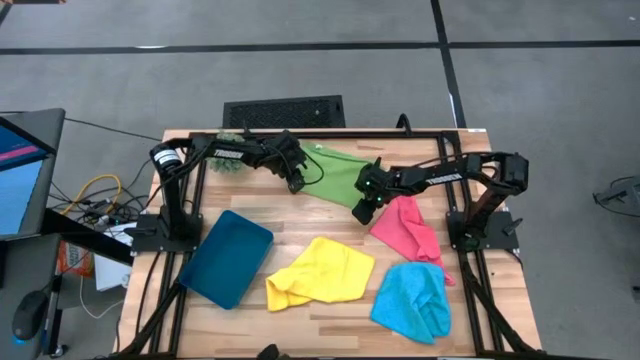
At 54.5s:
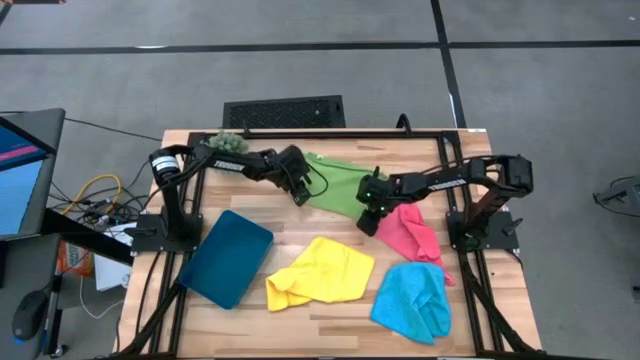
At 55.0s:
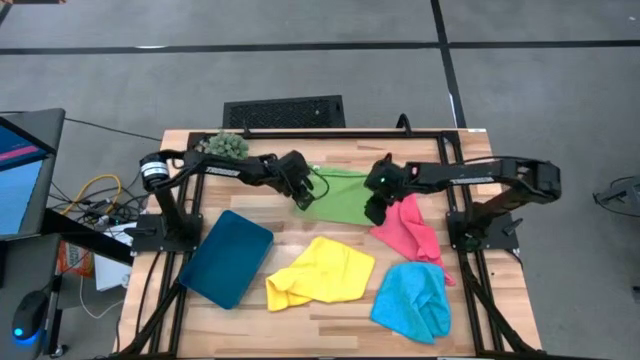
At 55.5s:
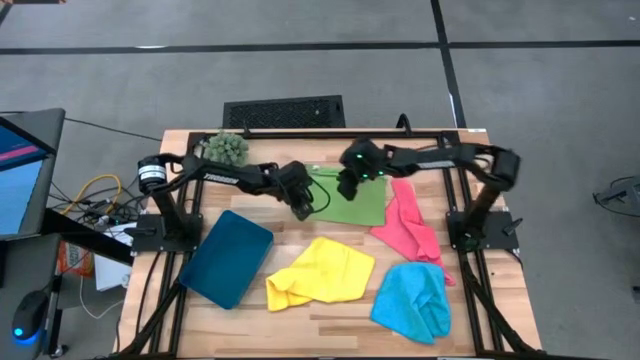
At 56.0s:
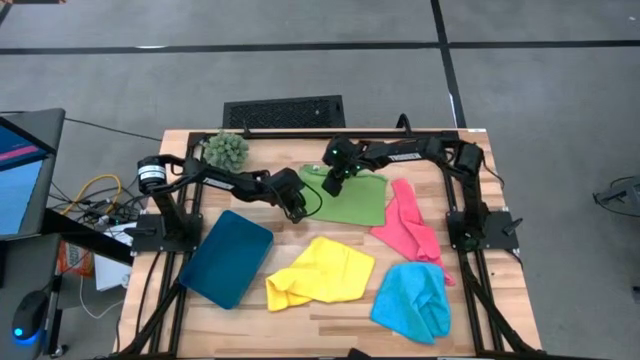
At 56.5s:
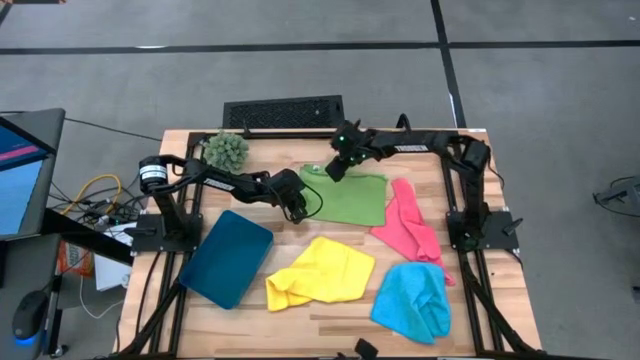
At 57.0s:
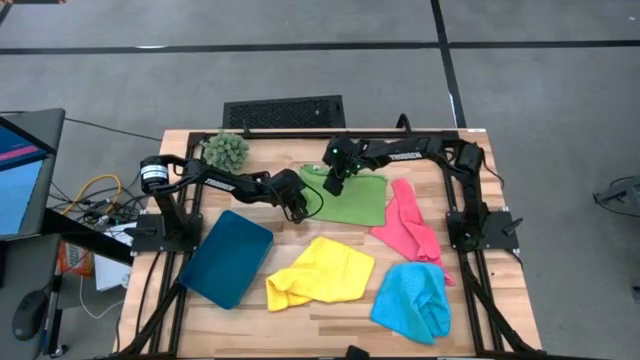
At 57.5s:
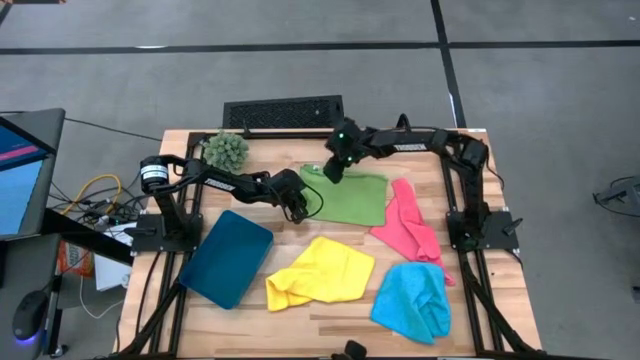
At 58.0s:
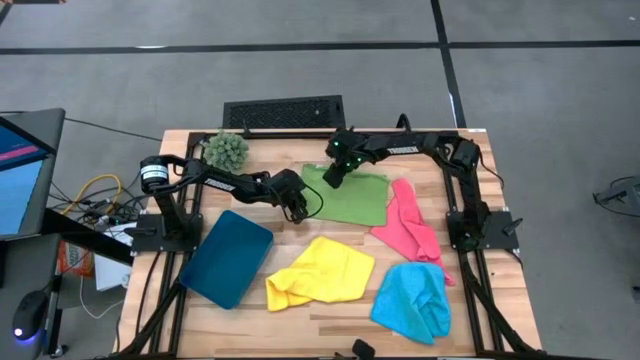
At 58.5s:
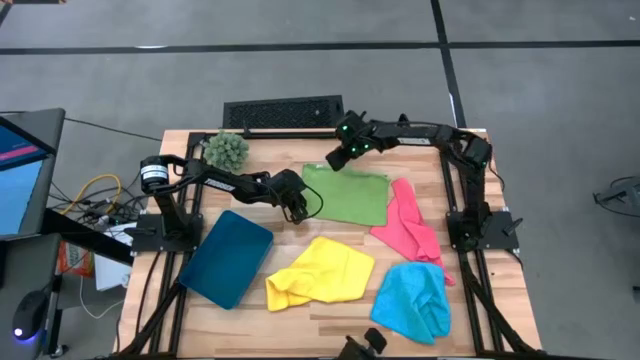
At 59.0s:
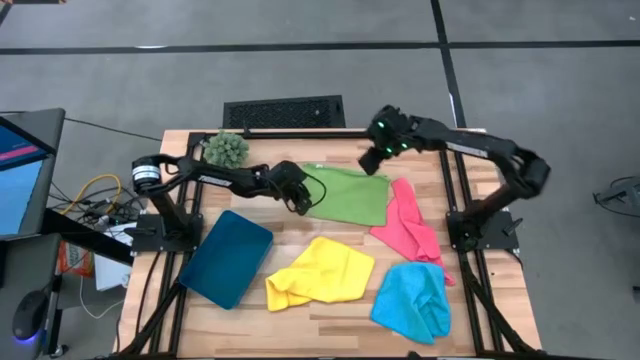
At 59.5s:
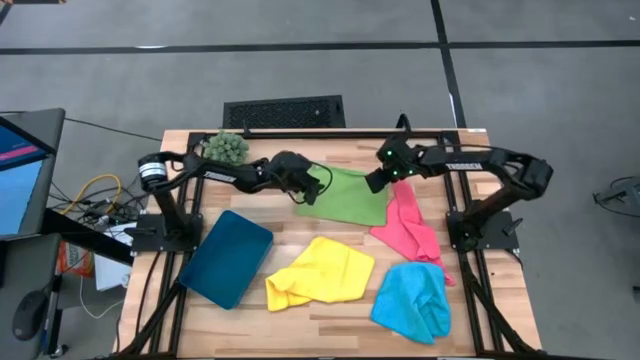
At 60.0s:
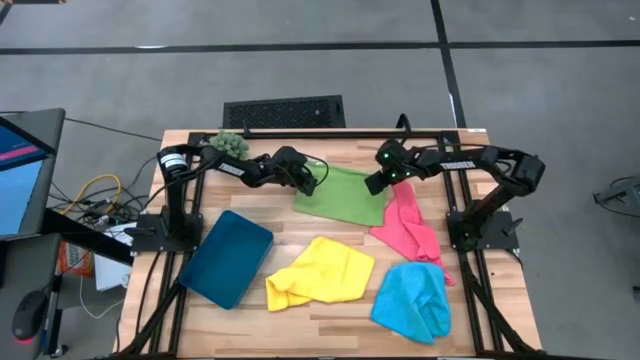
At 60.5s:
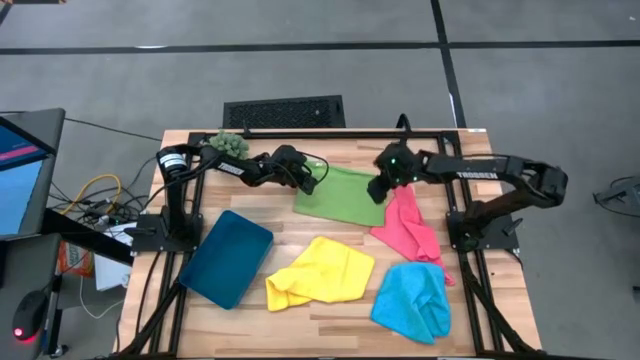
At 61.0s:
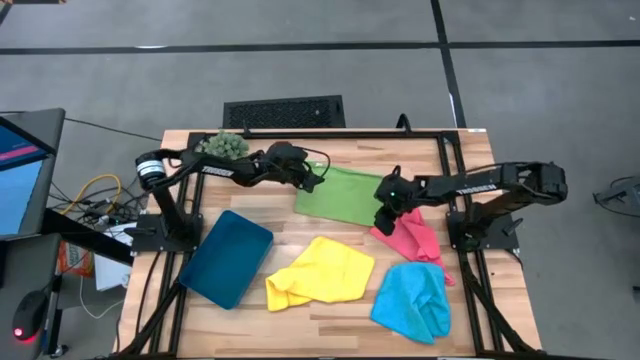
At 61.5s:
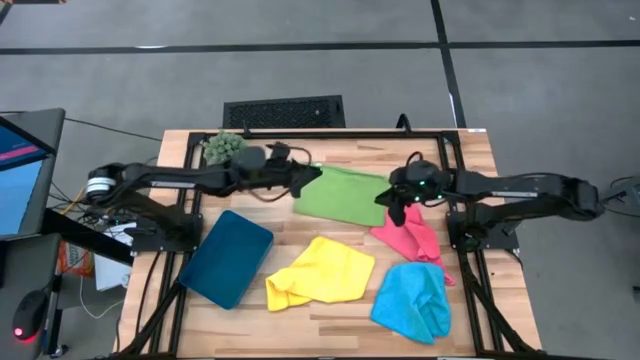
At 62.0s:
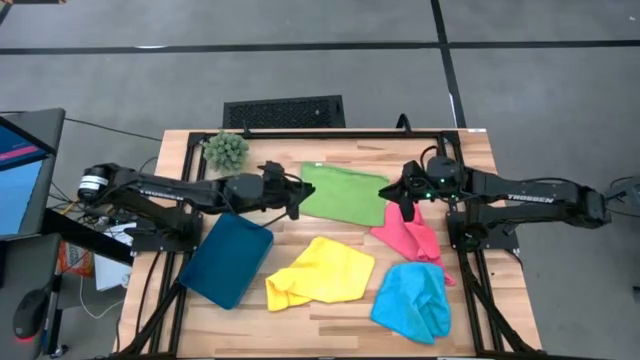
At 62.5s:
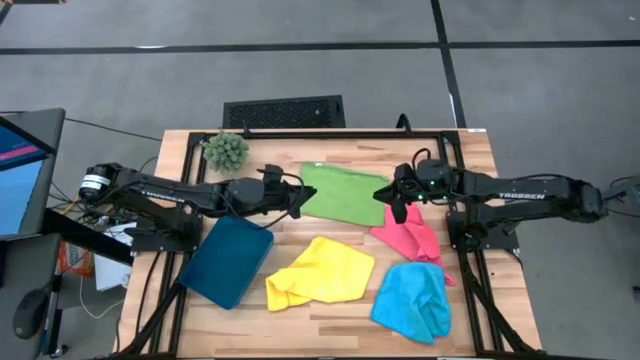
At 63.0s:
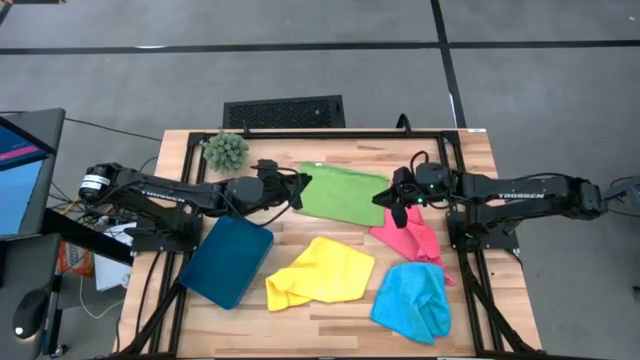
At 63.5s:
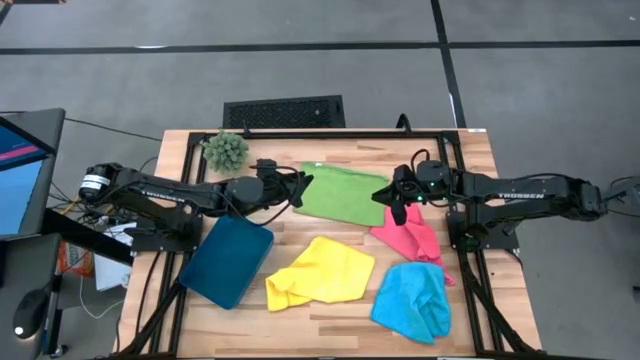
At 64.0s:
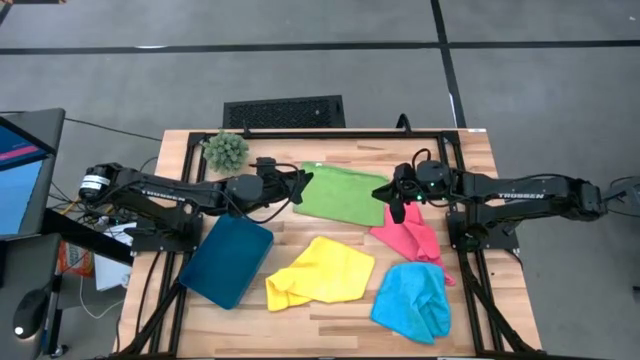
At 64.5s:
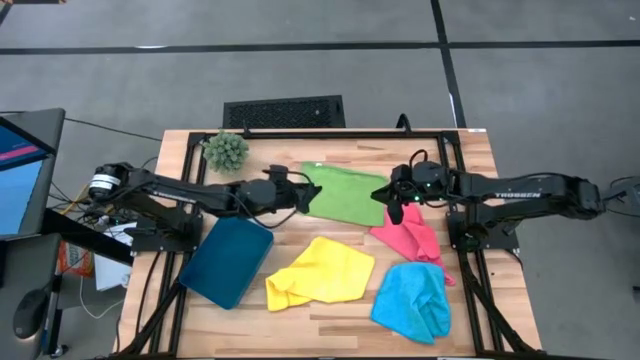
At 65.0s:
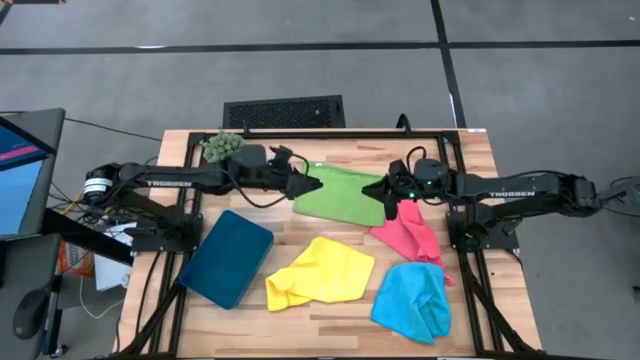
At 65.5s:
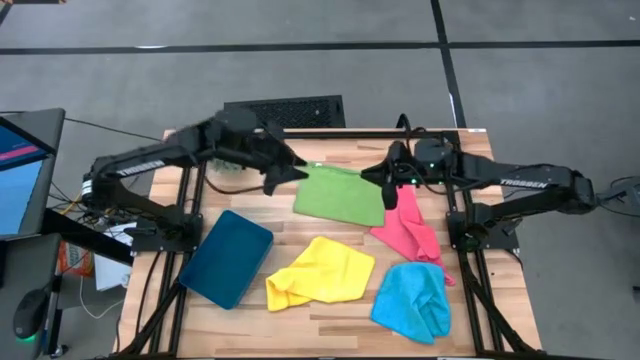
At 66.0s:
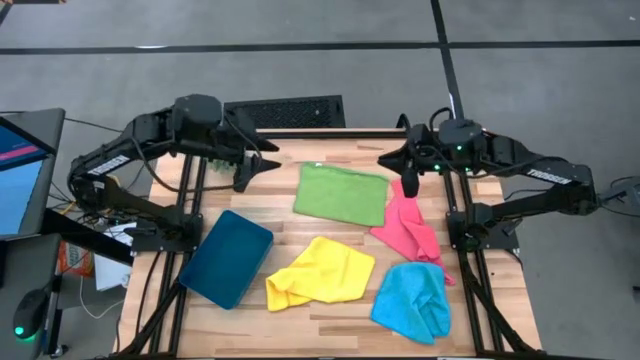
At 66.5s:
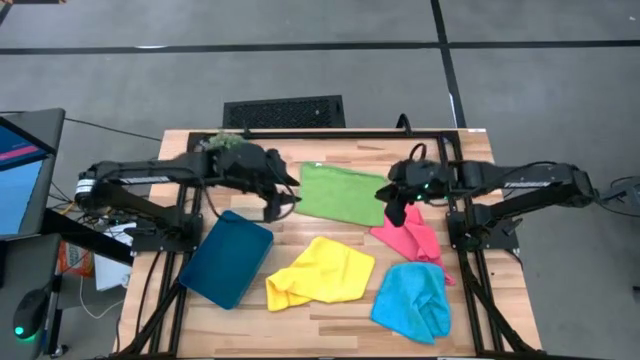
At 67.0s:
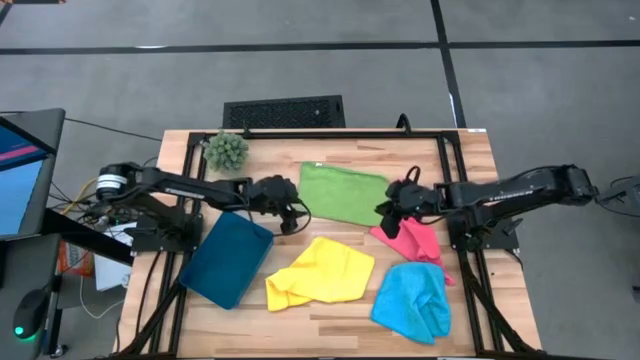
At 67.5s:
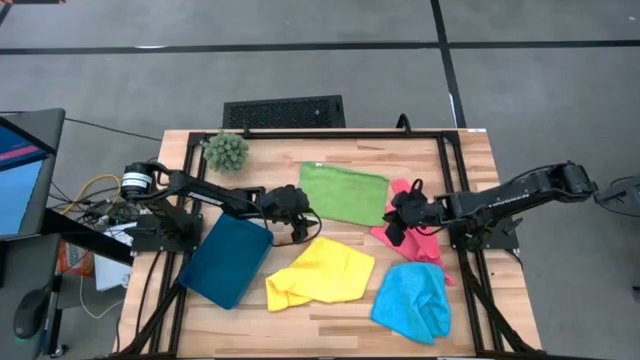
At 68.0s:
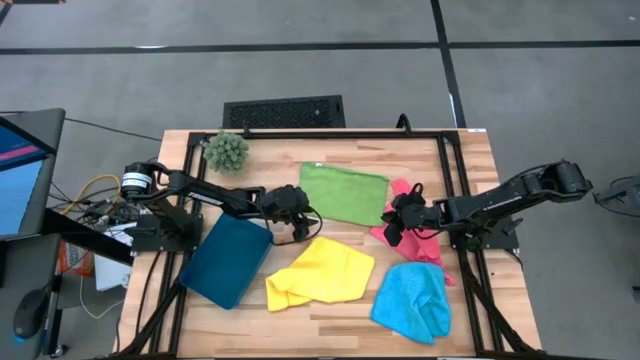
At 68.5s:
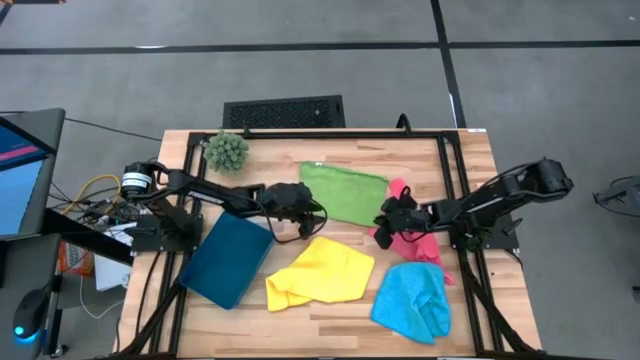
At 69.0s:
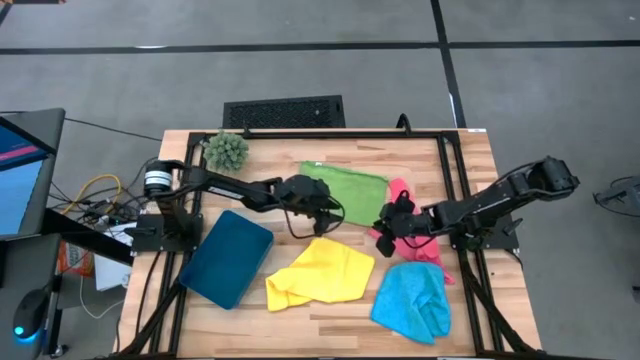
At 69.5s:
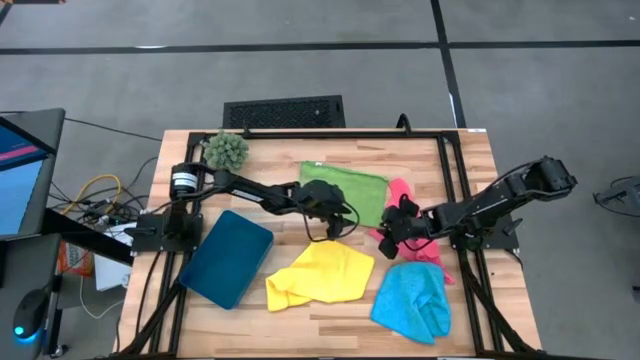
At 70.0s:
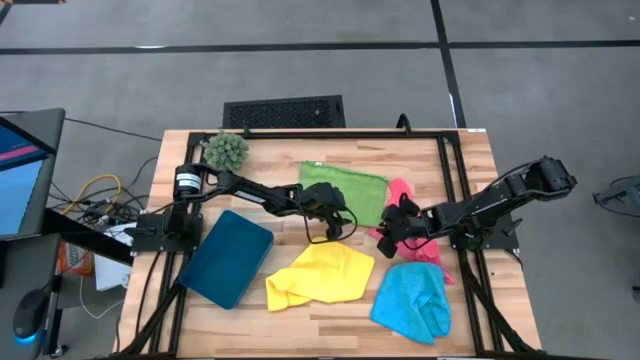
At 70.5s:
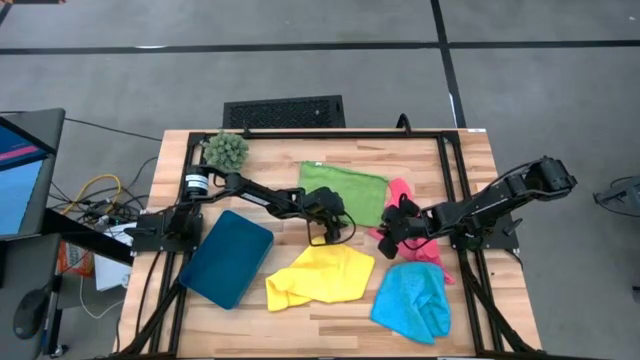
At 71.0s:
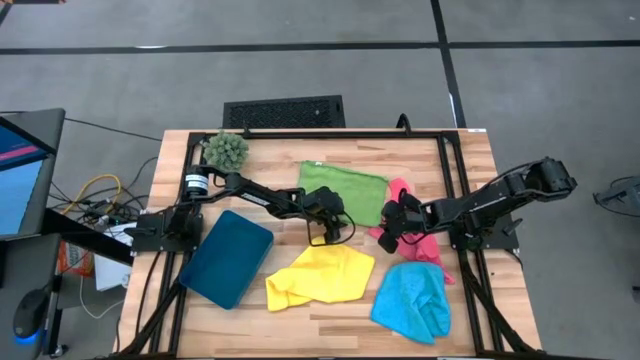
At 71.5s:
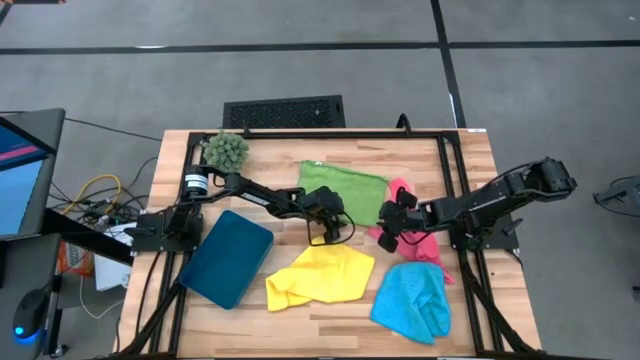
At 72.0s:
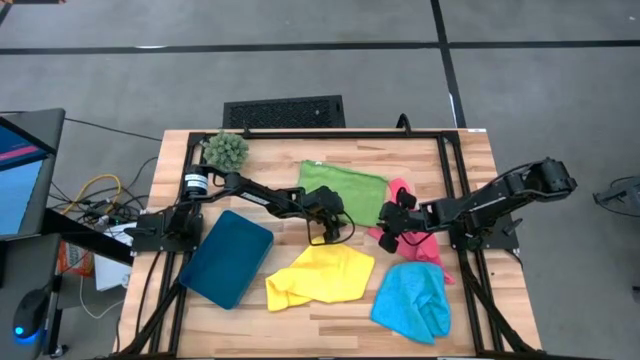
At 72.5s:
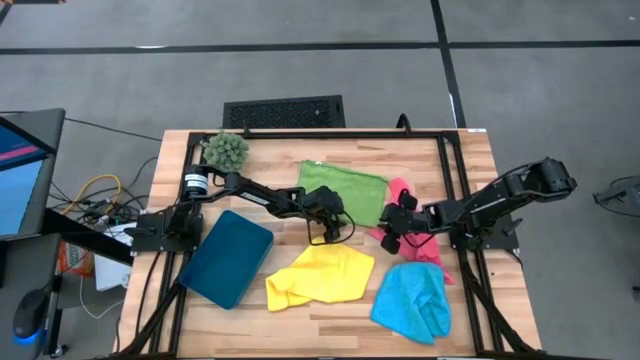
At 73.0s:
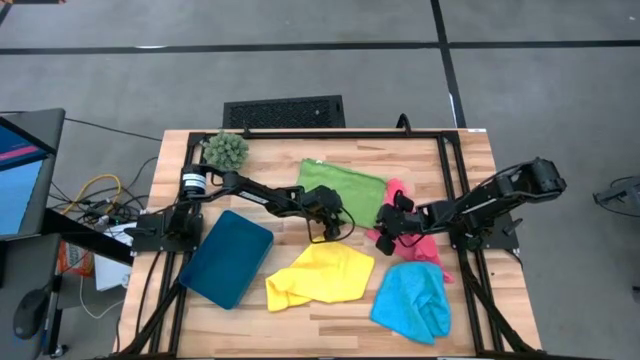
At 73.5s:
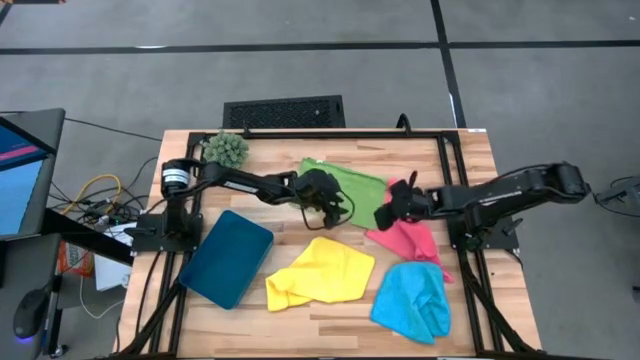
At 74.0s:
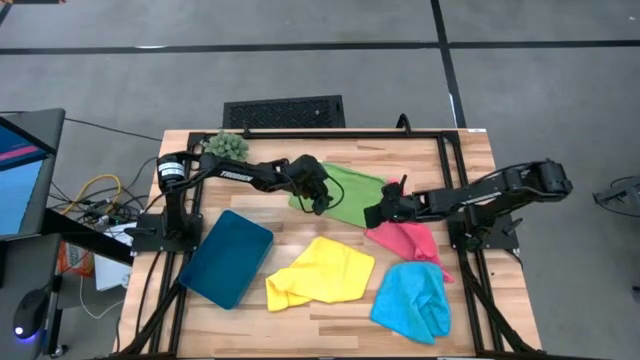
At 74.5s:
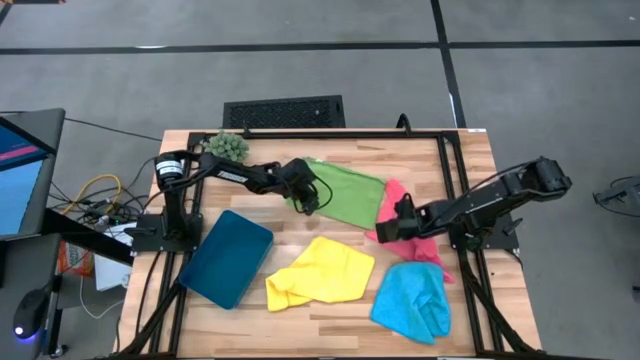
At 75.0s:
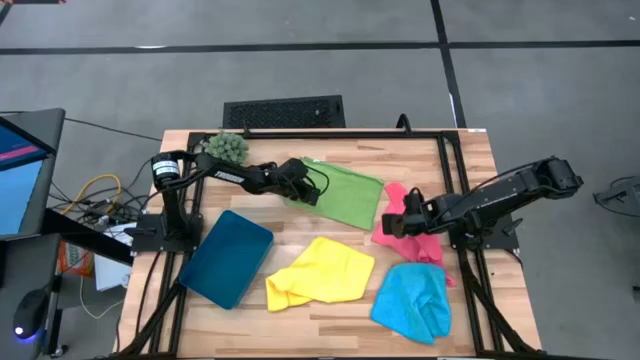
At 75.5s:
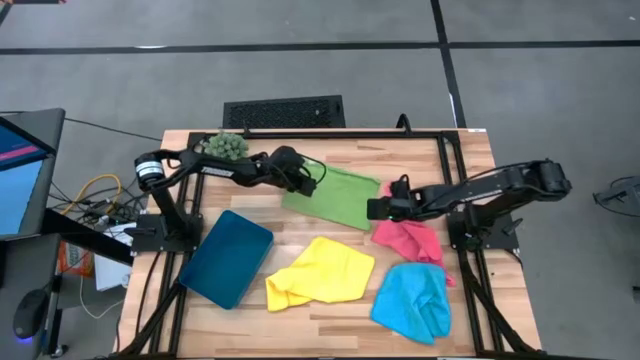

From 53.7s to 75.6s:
Task: Fold microfiber towels
Fold the green microfiber towel

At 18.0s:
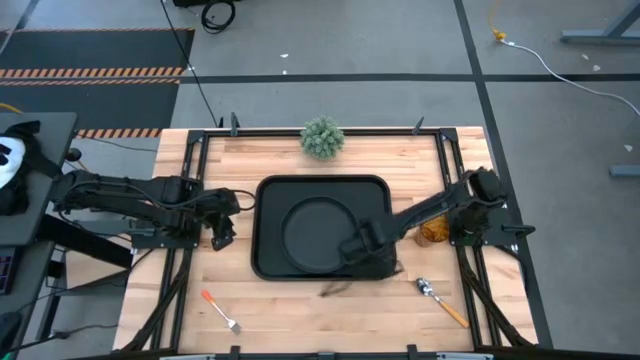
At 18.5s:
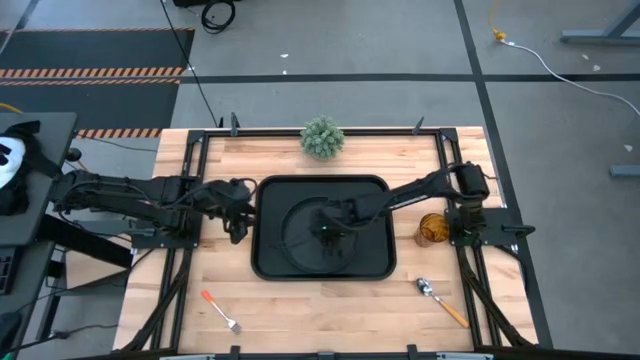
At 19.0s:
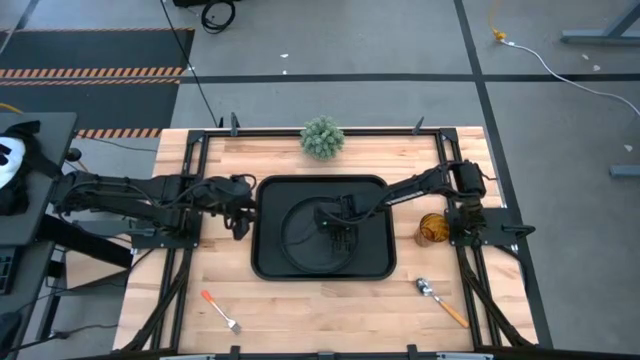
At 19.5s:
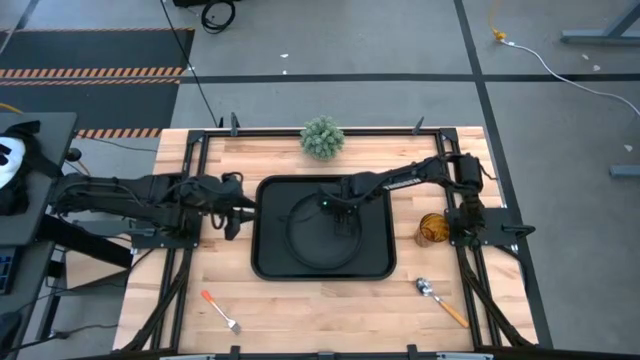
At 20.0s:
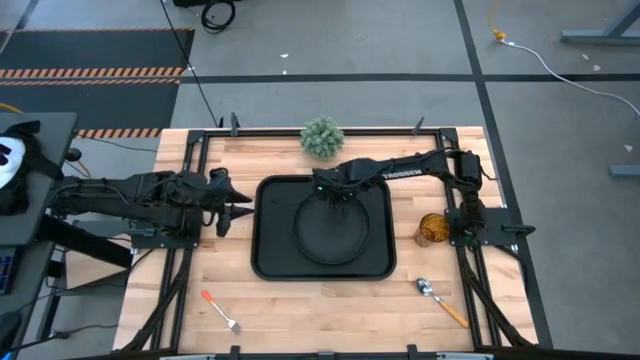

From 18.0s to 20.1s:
Task: Pick and place plate/cup/fork/spoon on tray
Adjust the black plate on the black serving tray
